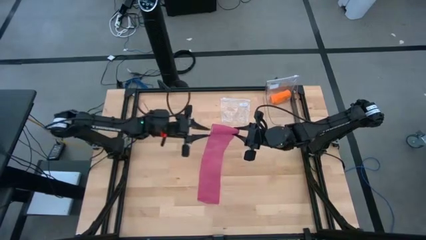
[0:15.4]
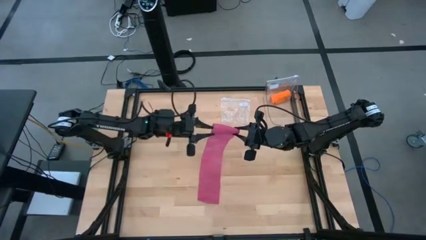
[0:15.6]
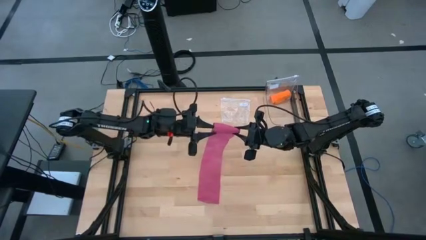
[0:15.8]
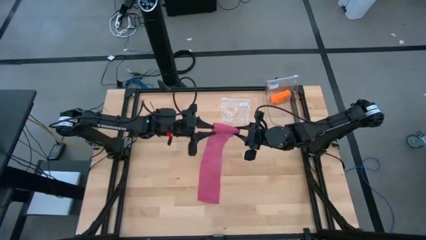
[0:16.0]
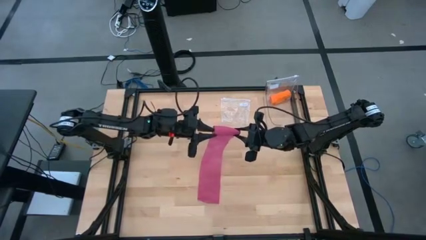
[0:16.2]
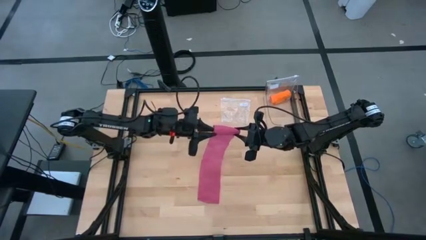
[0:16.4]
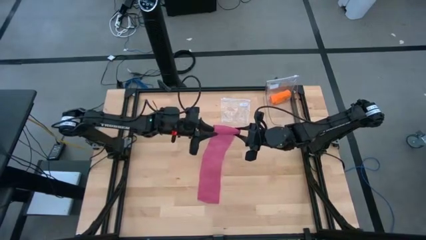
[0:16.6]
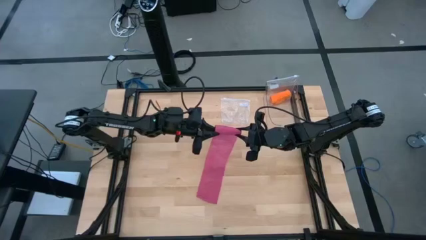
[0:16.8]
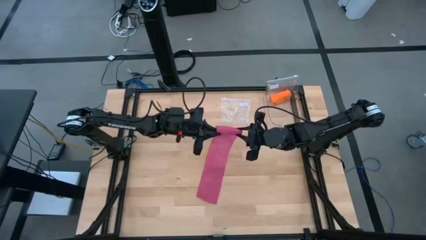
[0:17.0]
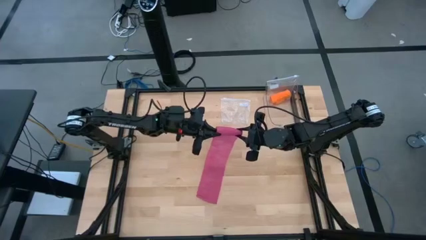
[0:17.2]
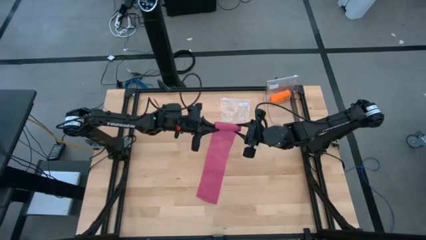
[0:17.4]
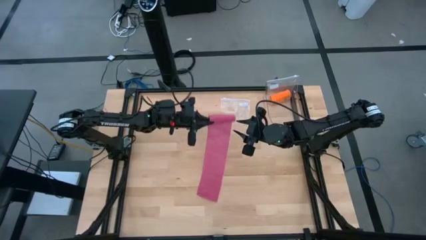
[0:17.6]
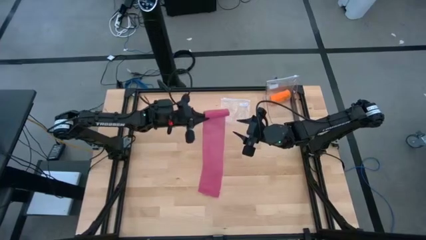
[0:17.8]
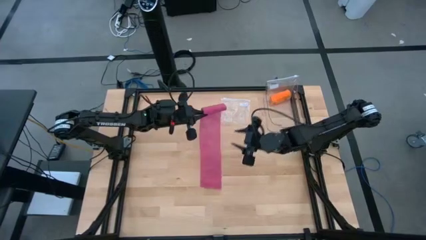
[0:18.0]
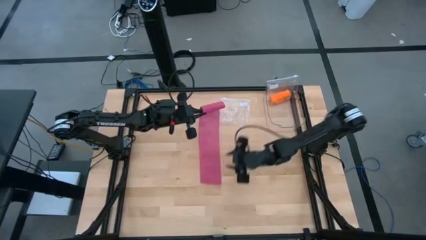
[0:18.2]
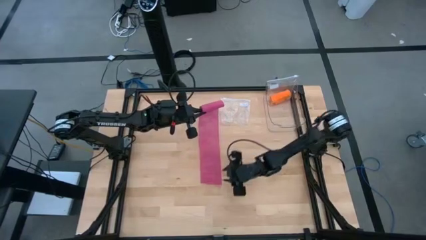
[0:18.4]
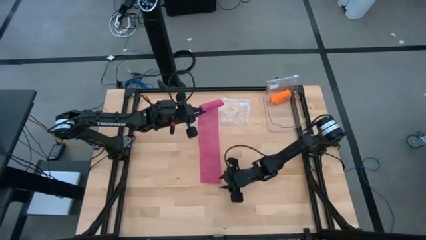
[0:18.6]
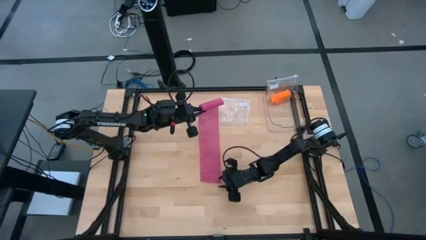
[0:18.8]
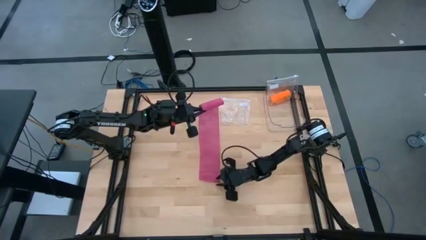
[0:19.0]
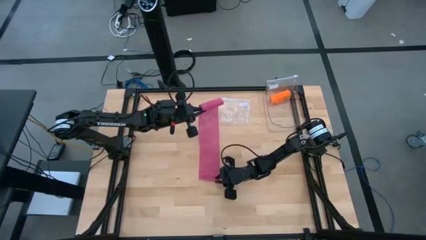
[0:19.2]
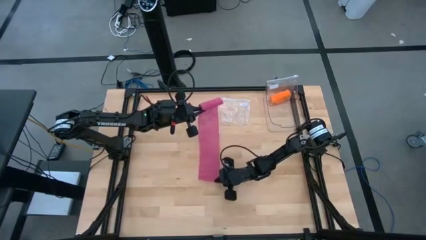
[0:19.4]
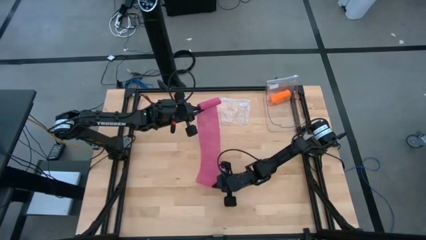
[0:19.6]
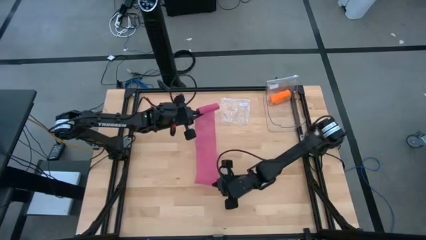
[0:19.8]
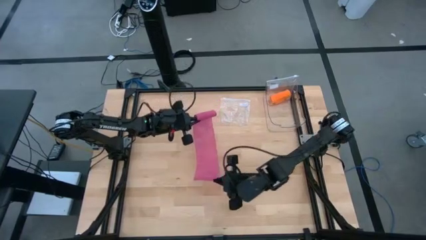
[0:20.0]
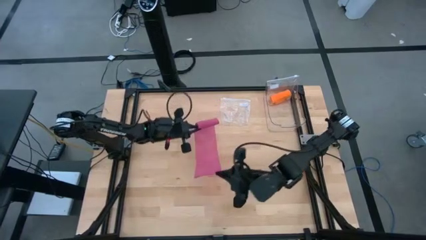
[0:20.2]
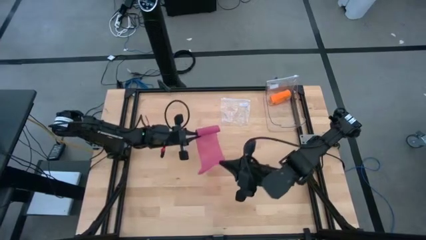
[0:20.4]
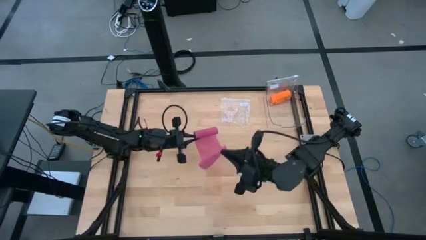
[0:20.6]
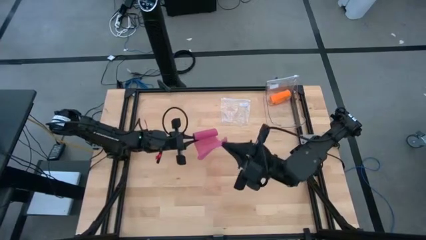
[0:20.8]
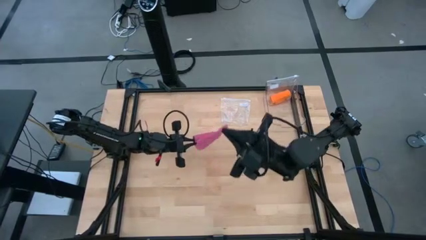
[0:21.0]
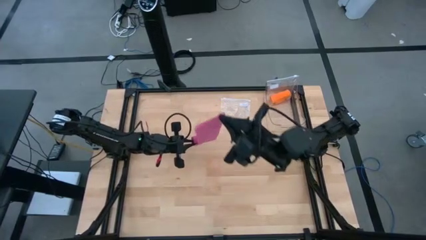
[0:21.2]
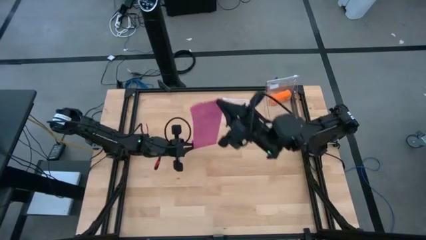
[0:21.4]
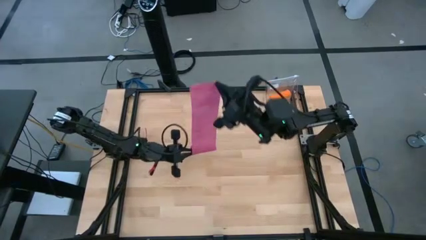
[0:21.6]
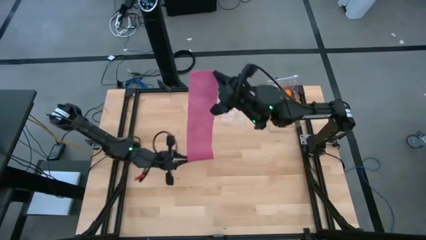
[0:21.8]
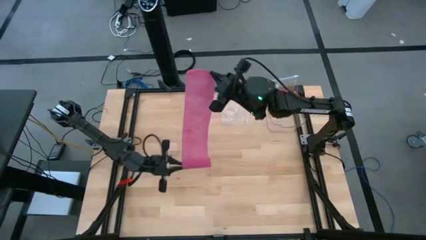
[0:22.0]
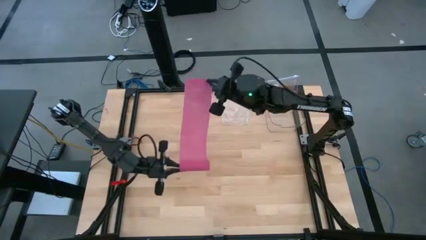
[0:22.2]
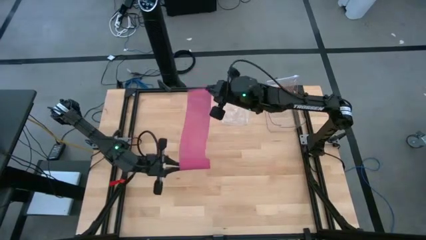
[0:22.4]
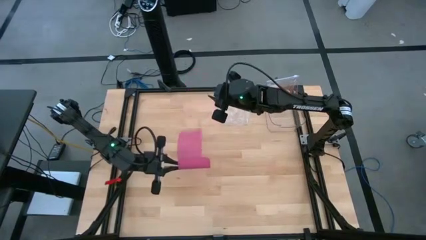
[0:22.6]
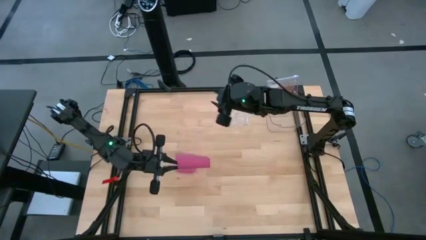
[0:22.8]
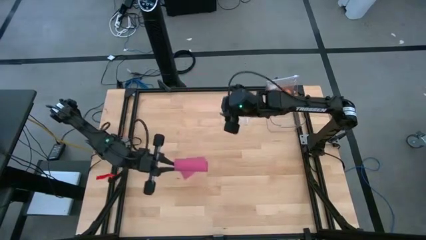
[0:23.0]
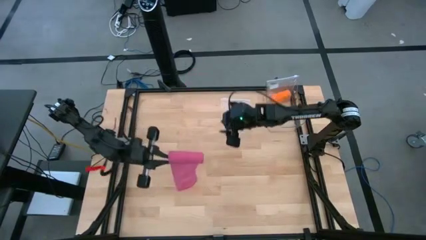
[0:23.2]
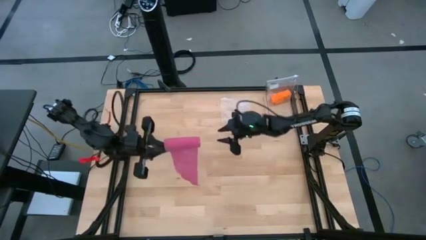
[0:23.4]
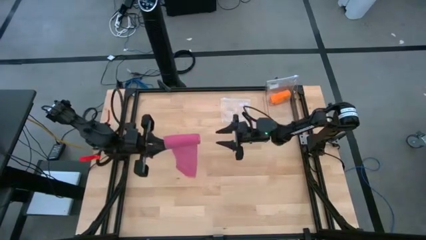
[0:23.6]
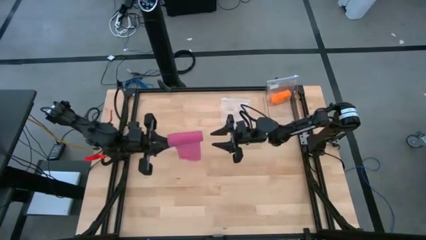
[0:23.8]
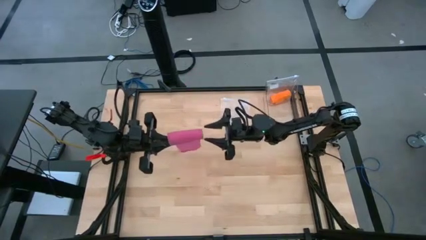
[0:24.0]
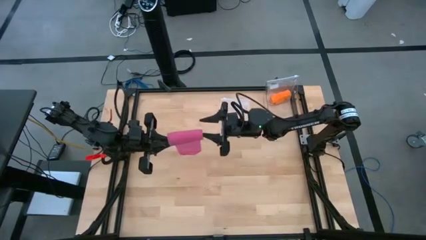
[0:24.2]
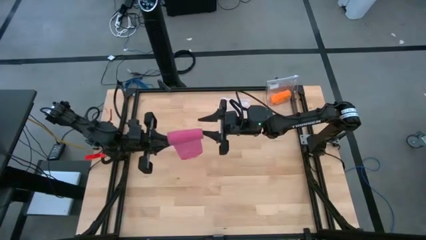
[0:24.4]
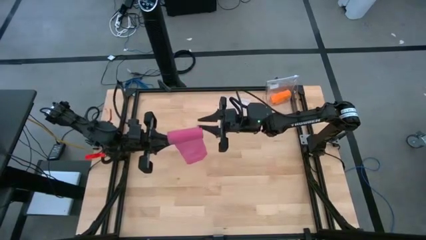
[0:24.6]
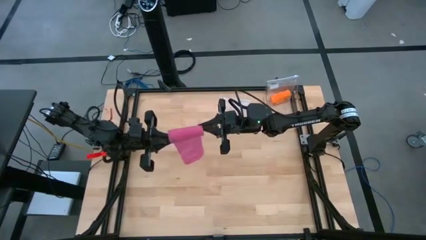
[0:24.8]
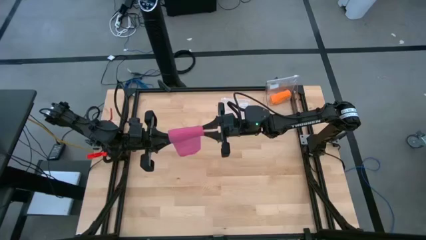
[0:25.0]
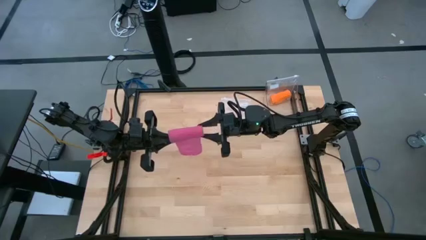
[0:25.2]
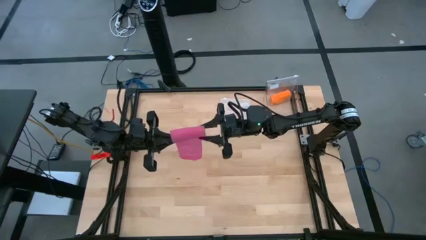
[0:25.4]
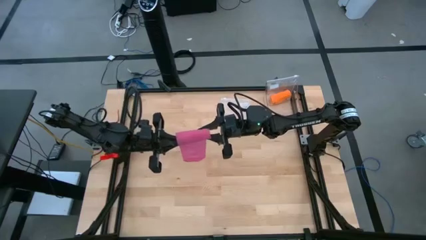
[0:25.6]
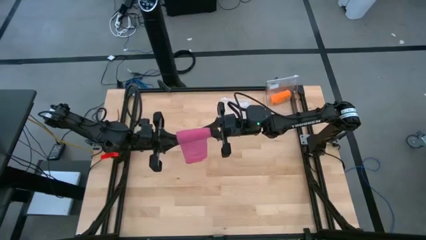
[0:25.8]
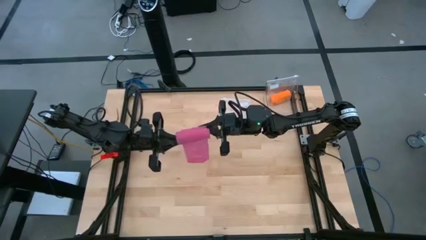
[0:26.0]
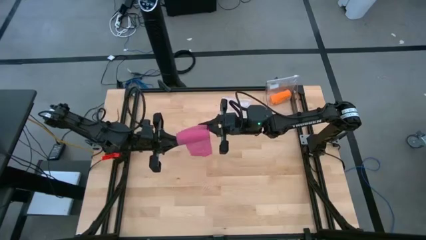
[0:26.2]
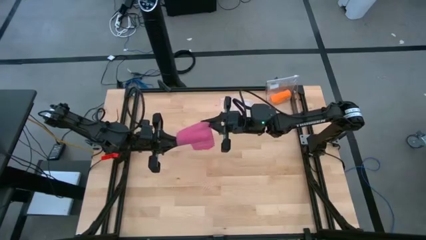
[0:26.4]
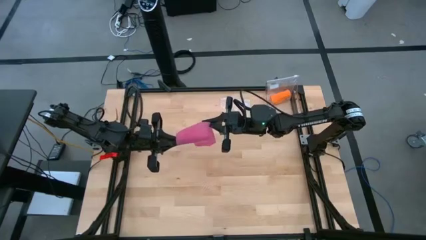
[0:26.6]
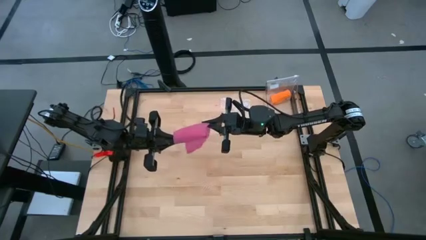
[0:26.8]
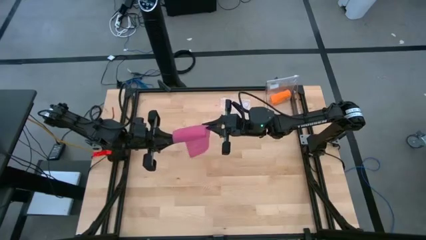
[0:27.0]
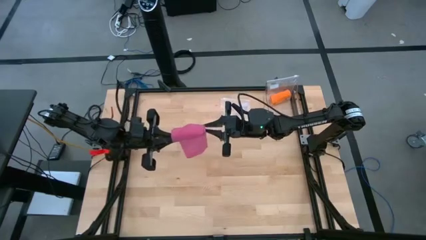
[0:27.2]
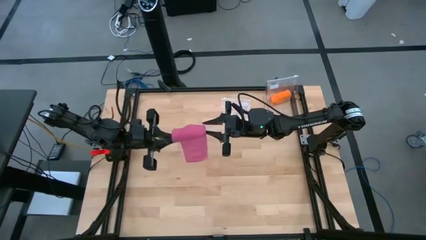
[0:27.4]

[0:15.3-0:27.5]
Task: Roll bandage
Roll the pink bandage

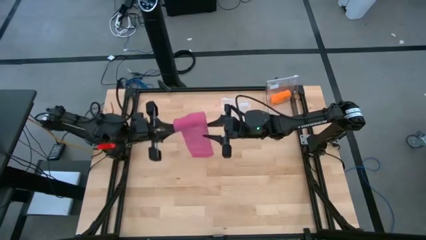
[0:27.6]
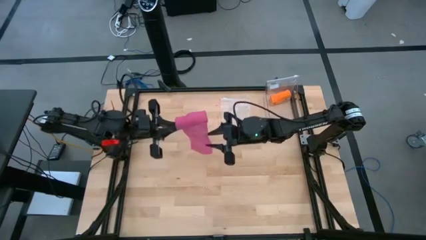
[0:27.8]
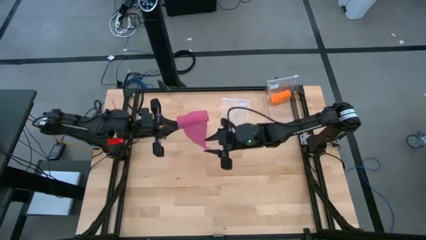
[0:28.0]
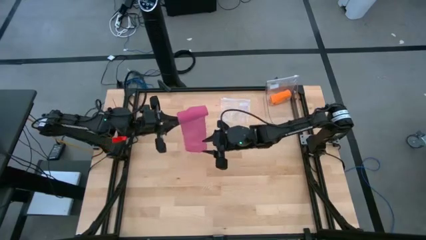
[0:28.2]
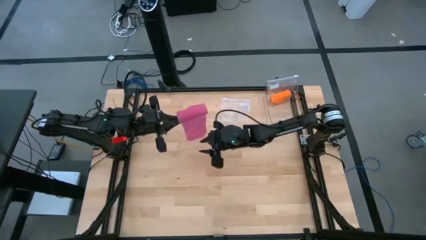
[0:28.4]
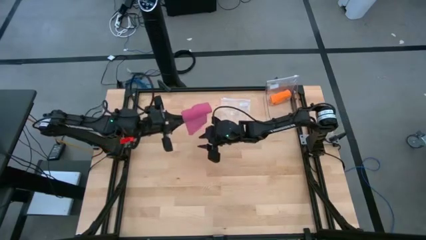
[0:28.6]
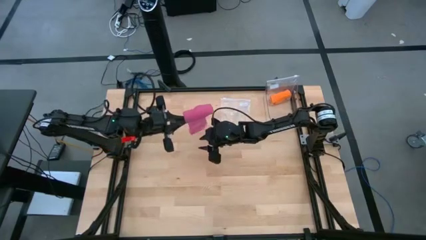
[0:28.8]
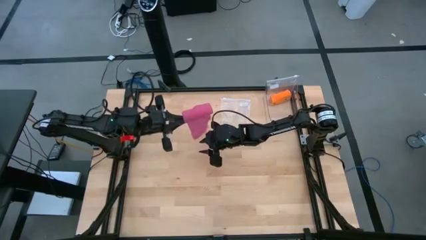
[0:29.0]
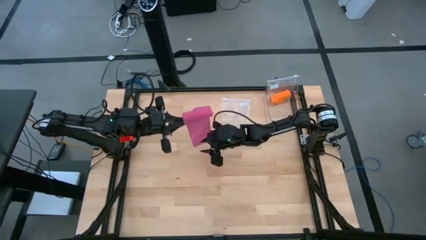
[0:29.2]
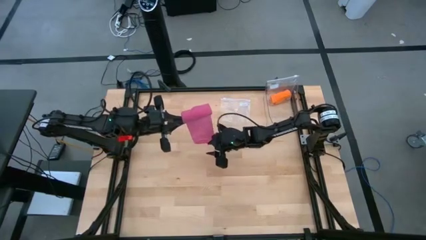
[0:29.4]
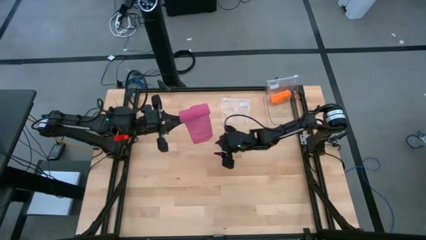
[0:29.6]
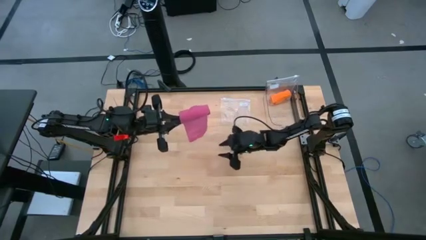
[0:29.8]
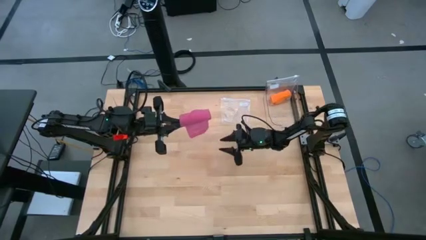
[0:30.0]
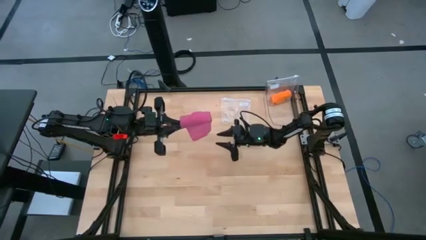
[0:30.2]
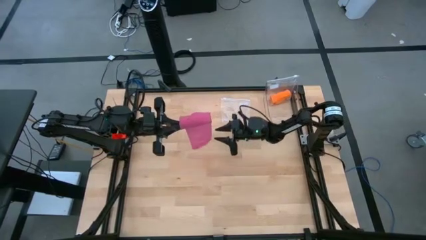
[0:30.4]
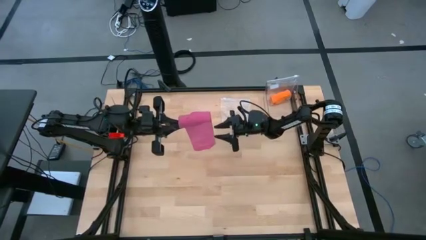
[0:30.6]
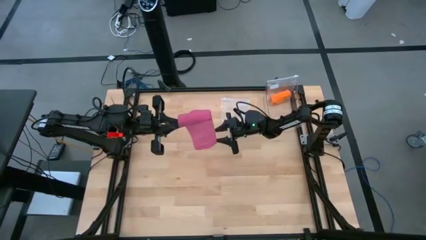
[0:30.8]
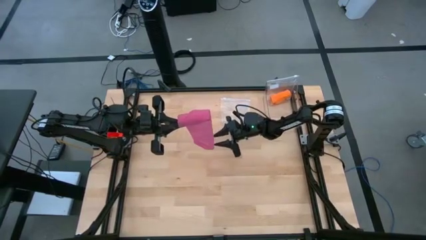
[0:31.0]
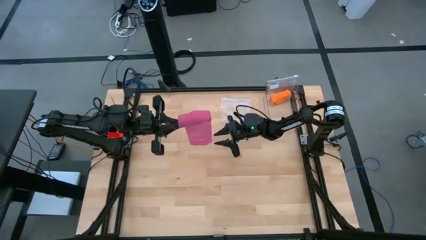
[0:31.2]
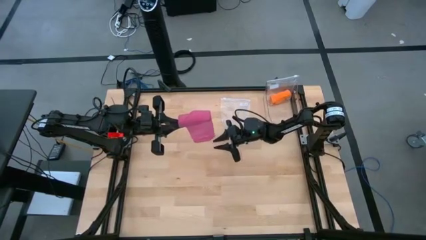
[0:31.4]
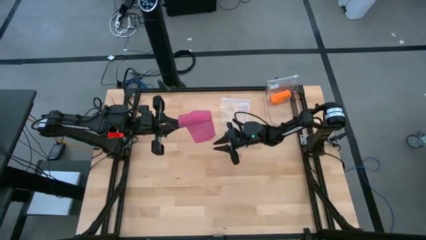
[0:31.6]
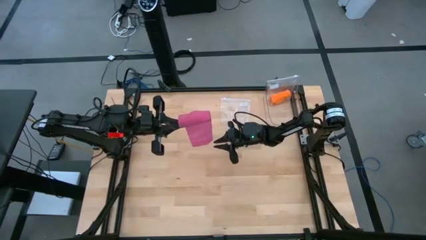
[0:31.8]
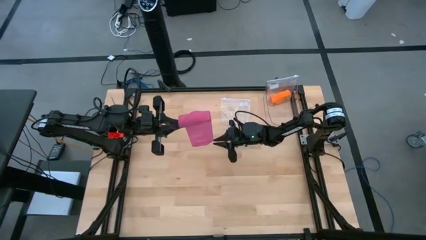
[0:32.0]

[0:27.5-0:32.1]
Roll the pink bandage
